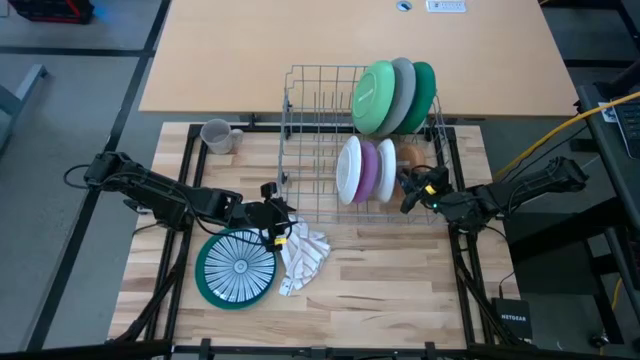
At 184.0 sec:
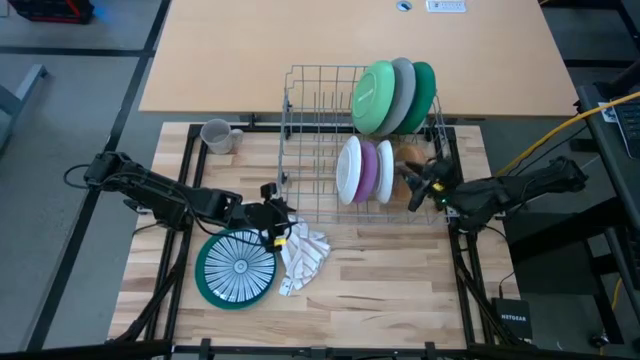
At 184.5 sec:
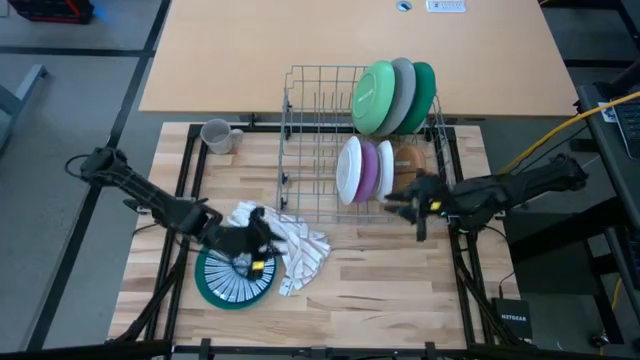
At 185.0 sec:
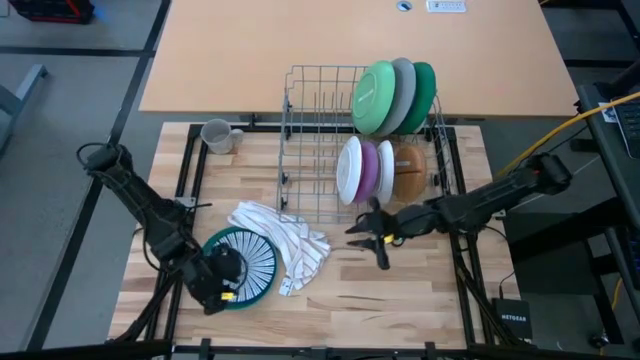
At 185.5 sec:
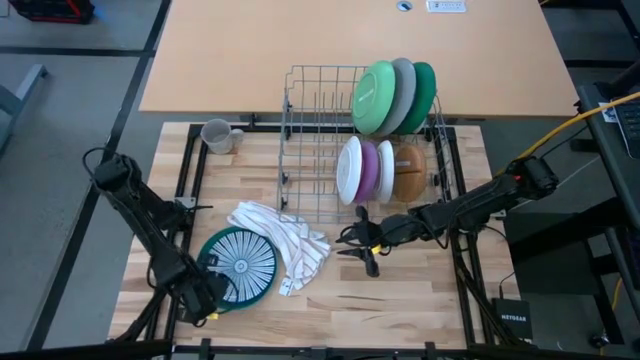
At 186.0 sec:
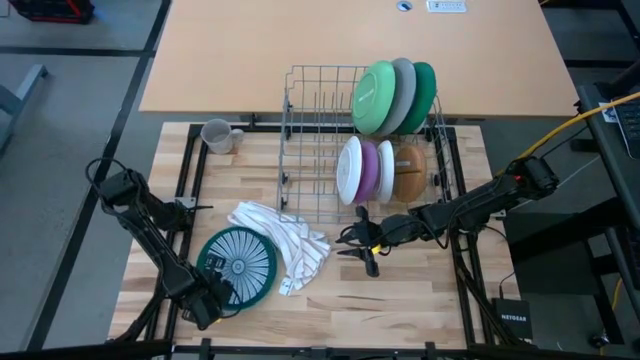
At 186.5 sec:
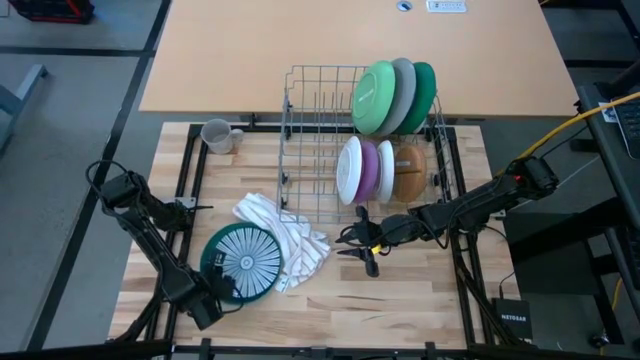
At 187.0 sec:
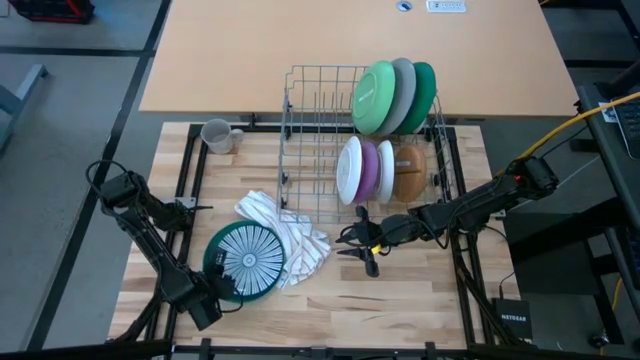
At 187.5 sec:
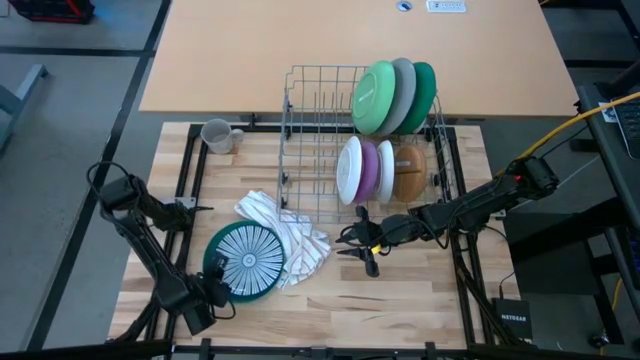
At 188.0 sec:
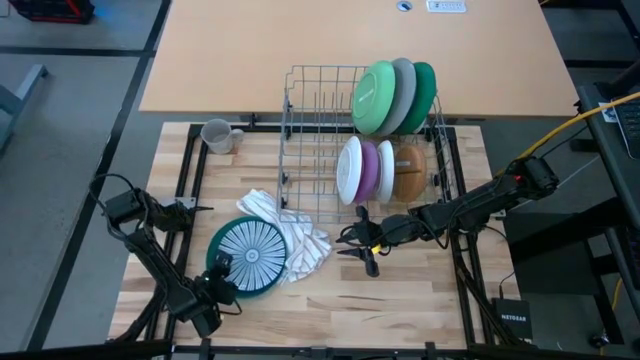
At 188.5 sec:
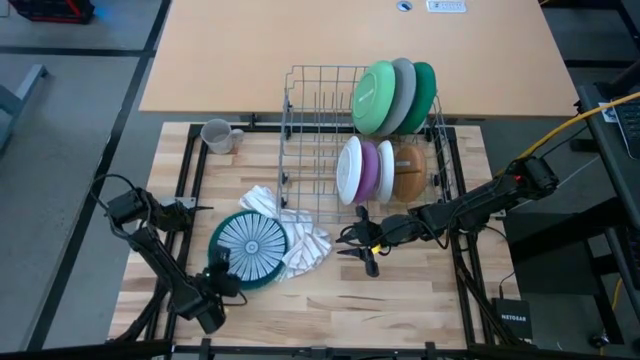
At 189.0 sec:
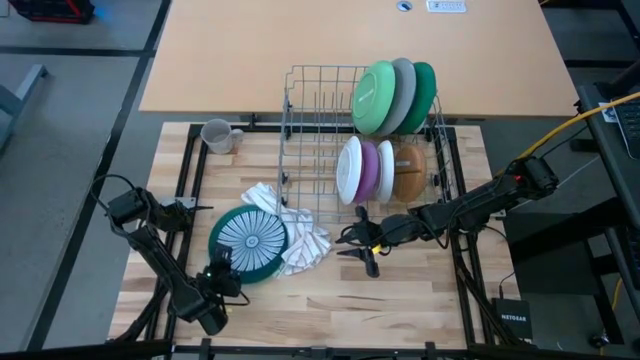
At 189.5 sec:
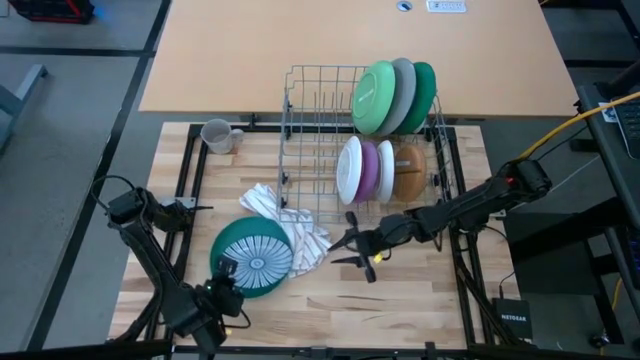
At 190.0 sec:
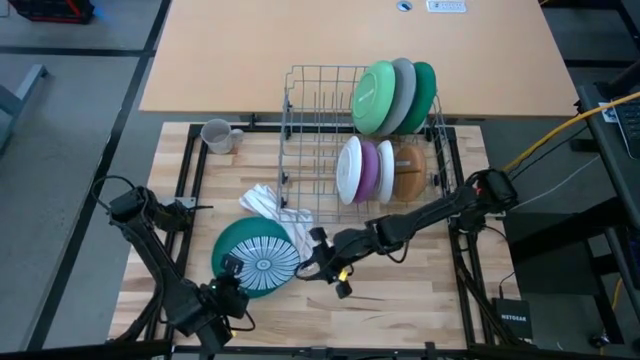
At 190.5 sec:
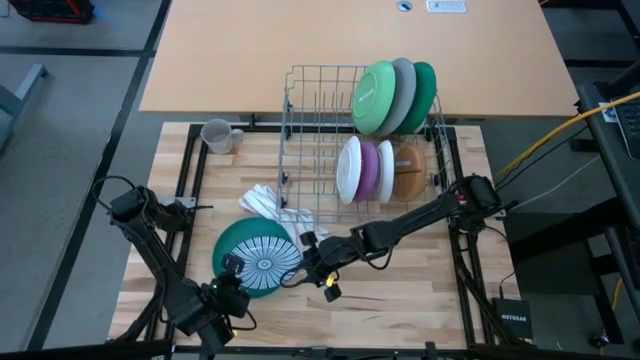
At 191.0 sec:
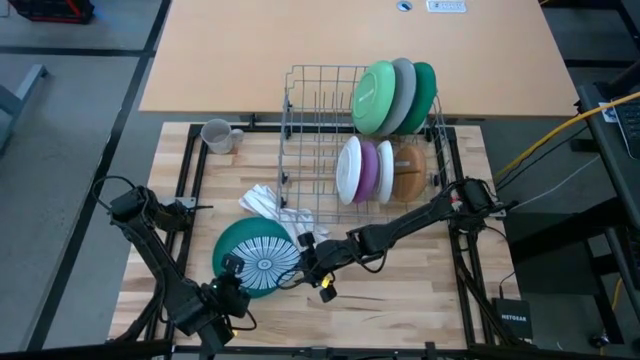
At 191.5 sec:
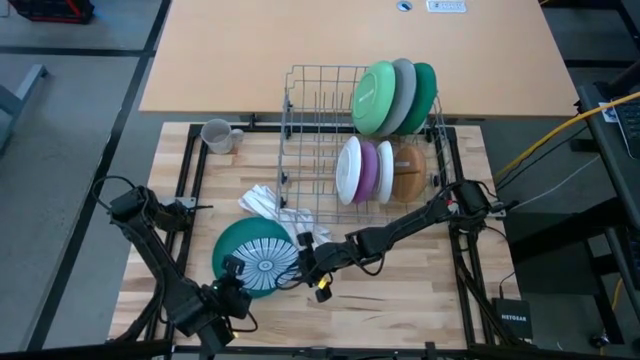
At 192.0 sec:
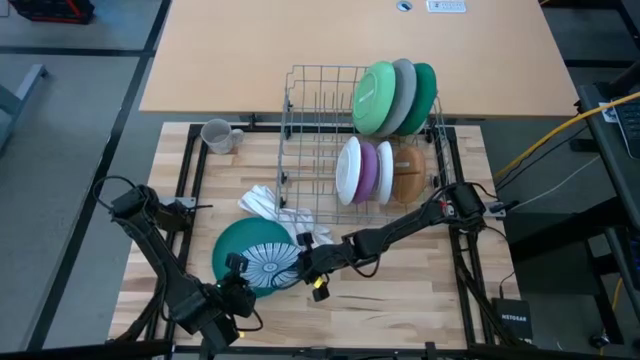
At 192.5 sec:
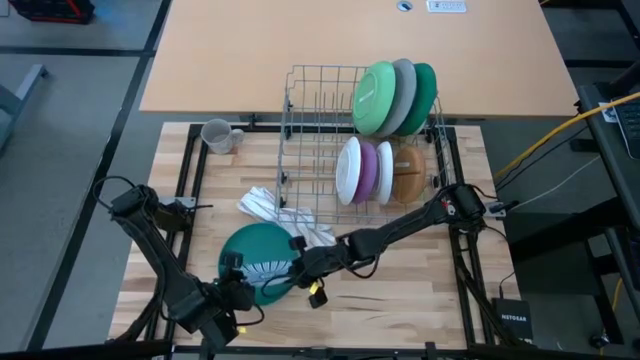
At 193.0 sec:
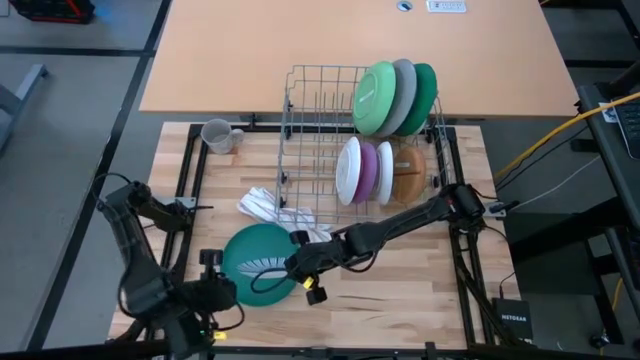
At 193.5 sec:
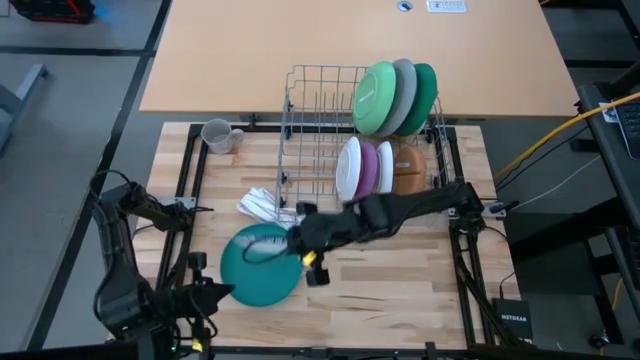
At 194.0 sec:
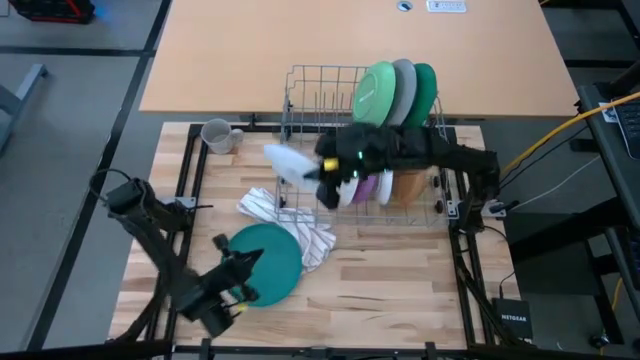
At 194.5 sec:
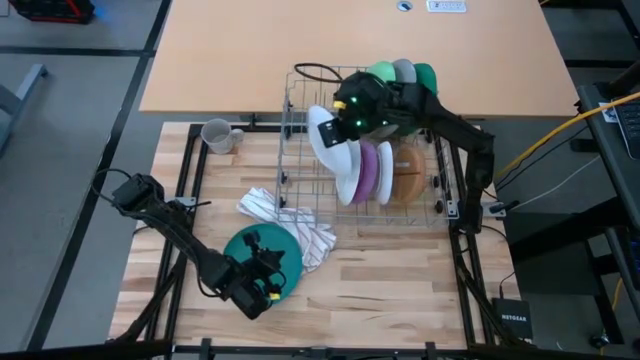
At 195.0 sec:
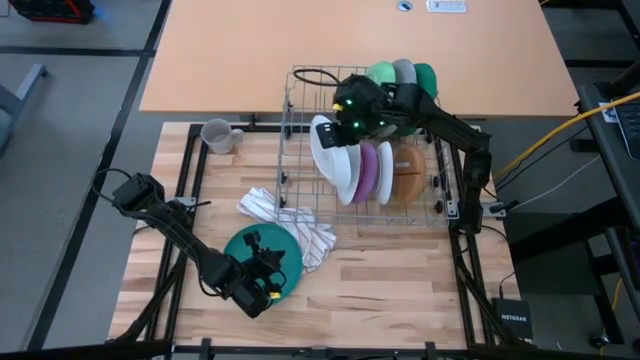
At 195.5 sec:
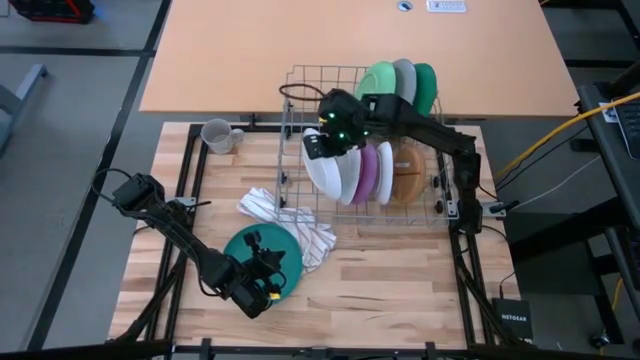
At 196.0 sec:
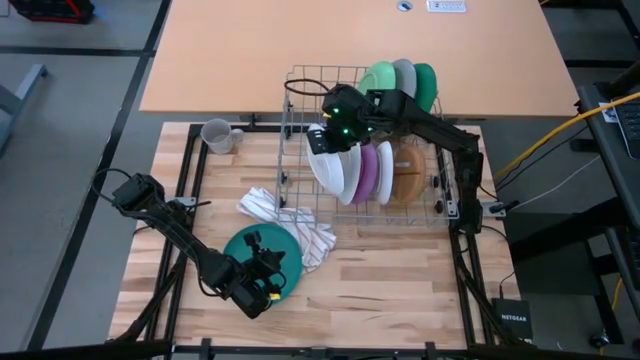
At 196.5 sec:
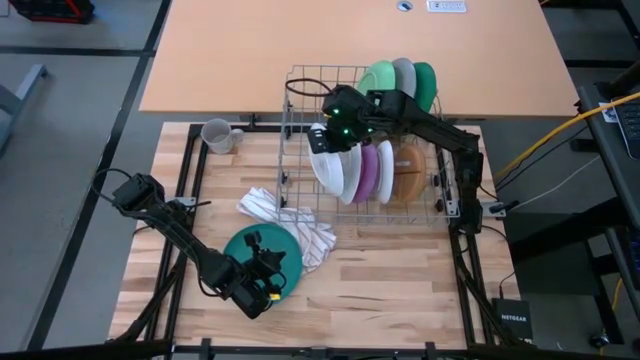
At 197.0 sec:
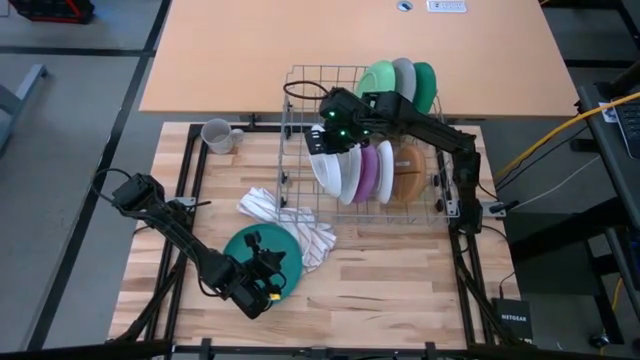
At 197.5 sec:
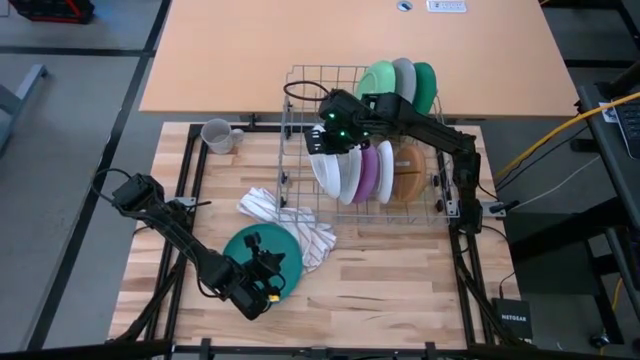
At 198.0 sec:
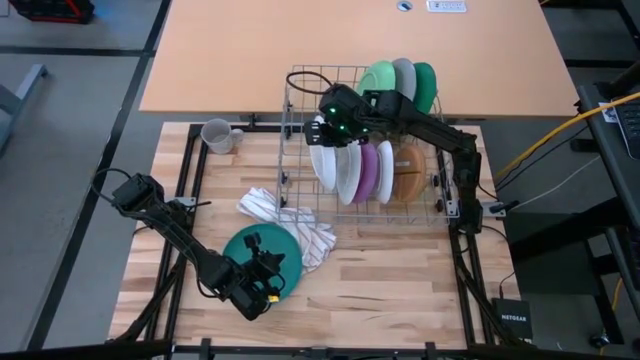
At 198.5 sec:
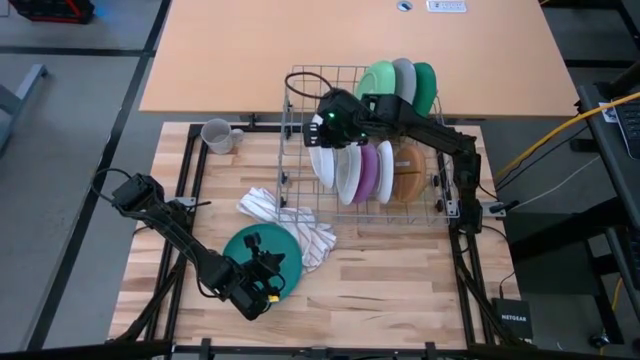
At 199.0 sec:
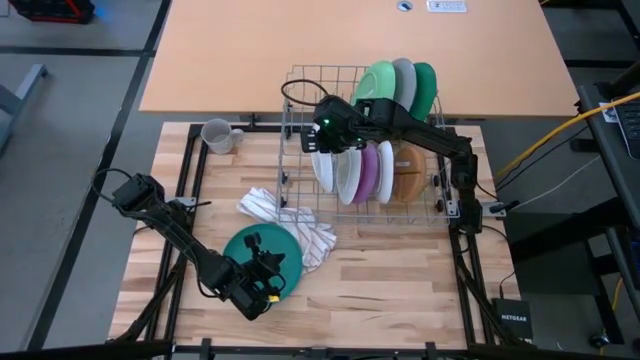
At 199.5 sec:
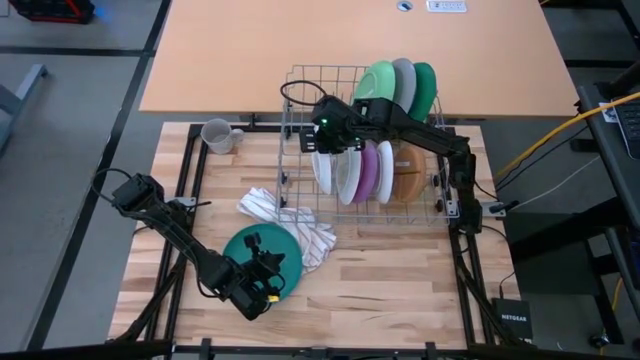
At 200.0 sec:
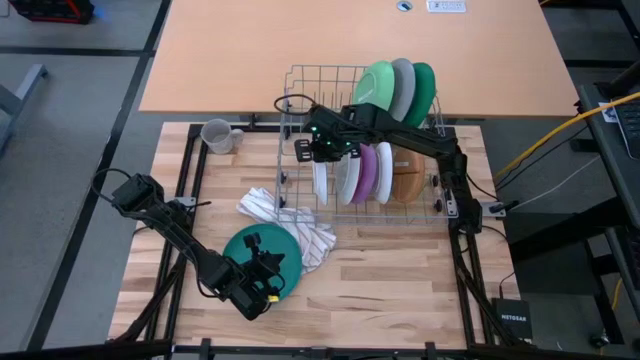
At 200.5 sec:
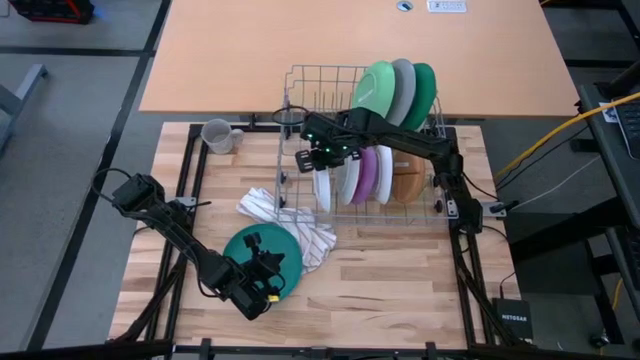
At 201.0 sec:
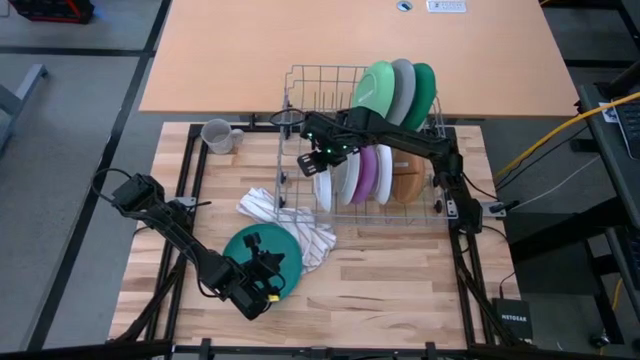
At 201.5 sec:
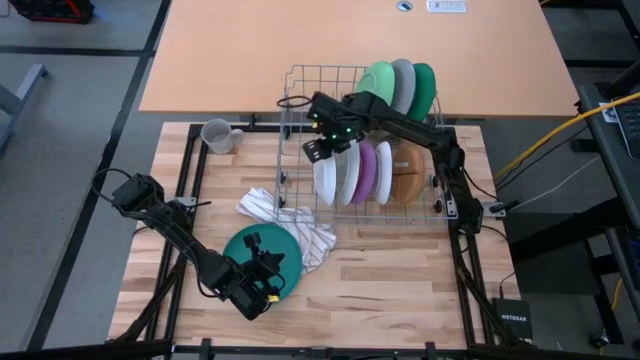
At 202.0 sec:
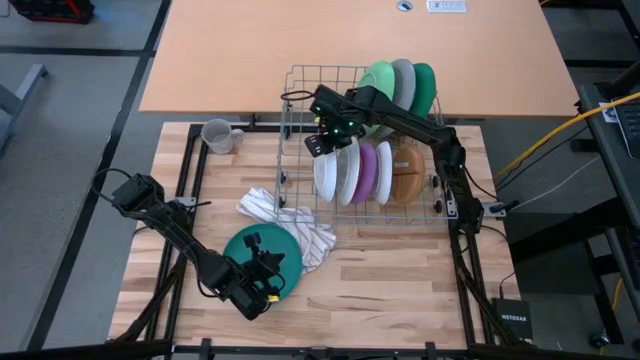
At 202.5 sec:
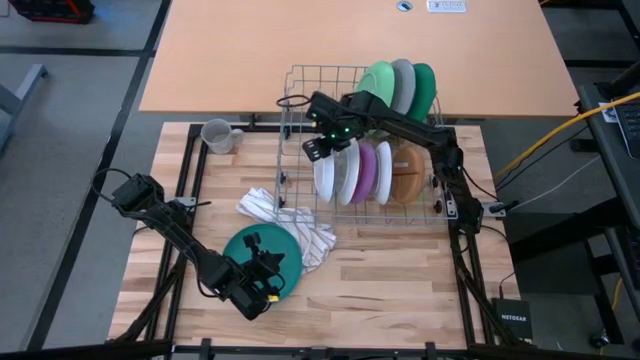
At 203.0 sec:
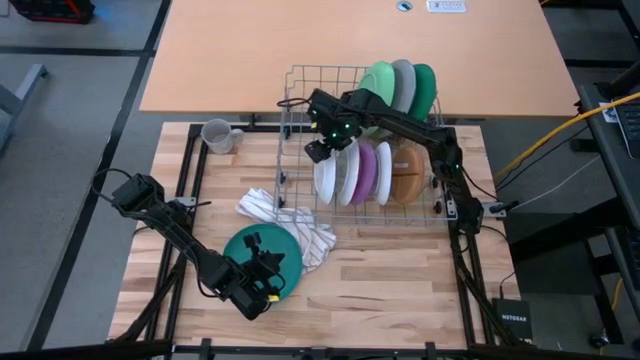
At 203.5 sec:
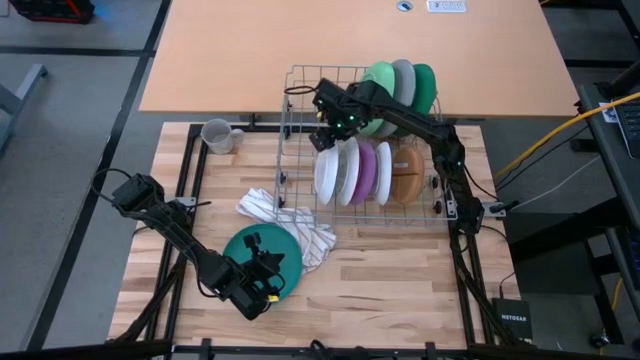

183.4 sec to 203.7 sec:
Task: Sort dishes
Put the blue patterned plate into the dish rack
